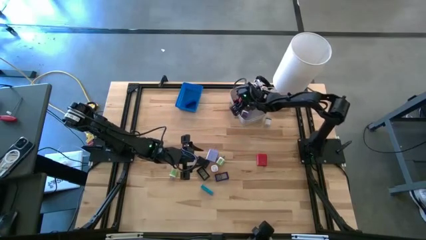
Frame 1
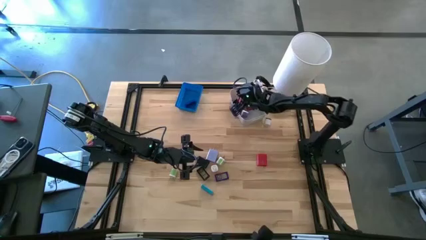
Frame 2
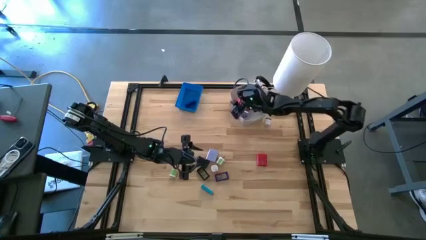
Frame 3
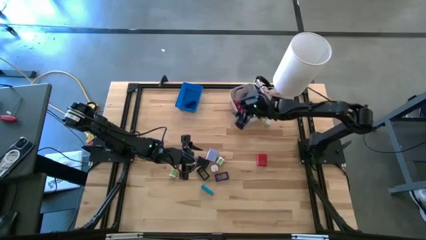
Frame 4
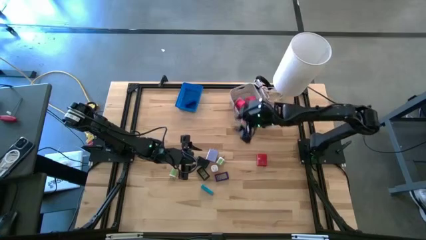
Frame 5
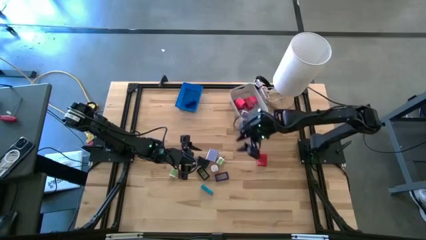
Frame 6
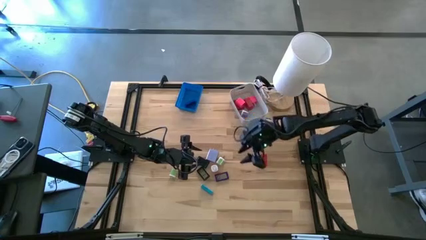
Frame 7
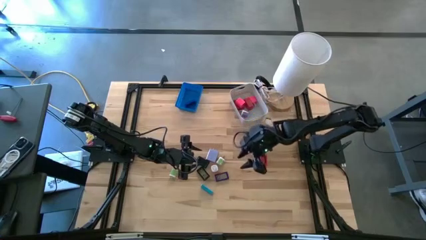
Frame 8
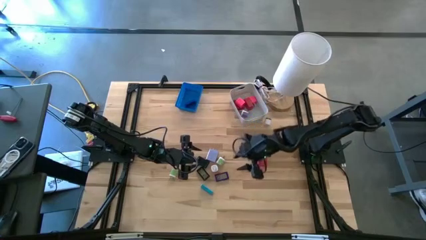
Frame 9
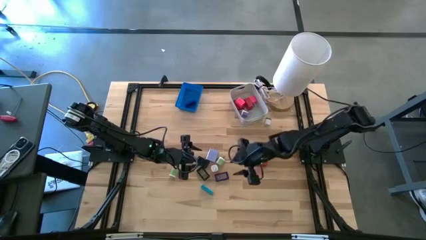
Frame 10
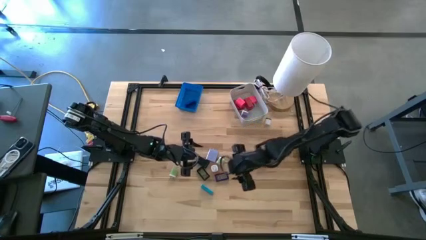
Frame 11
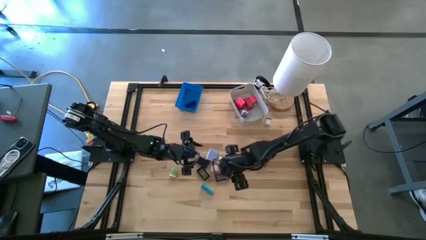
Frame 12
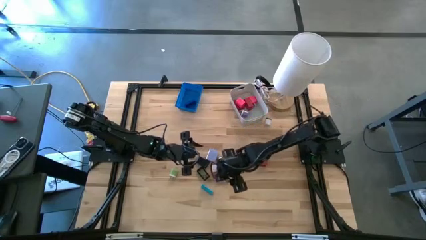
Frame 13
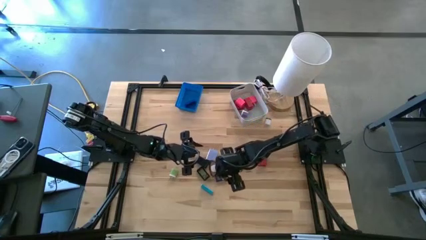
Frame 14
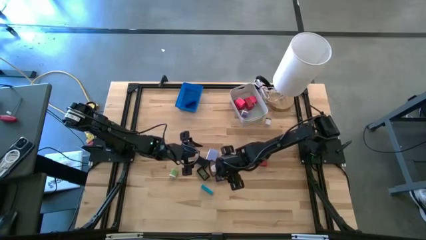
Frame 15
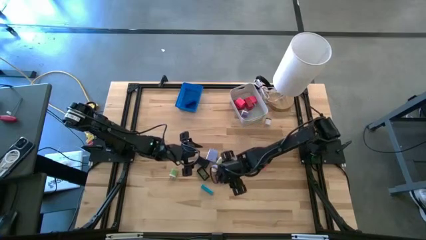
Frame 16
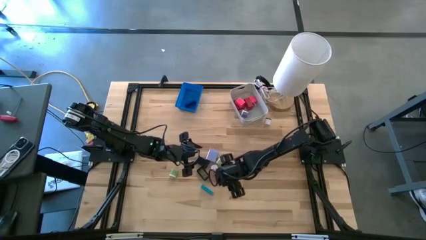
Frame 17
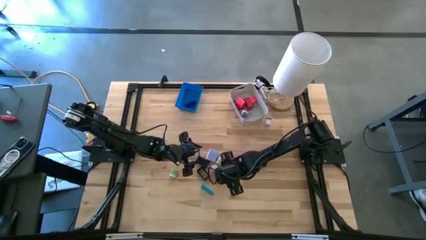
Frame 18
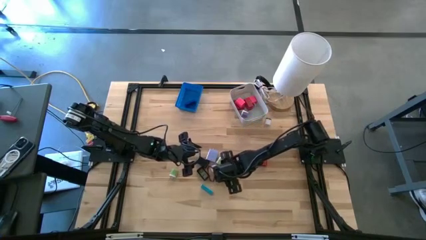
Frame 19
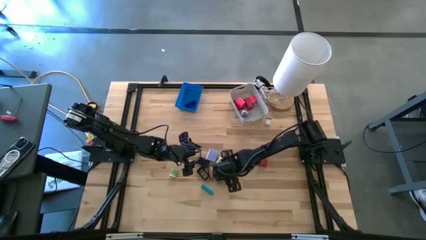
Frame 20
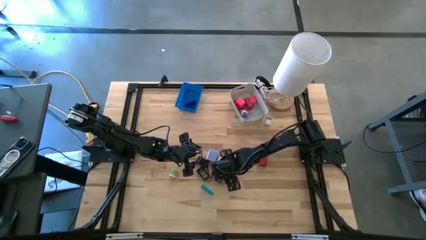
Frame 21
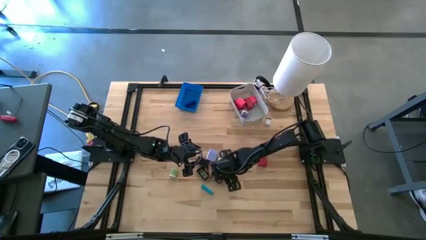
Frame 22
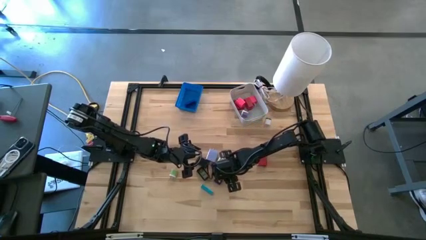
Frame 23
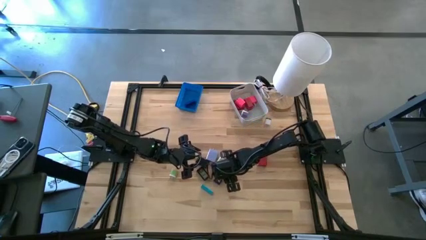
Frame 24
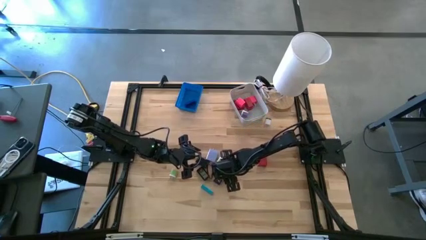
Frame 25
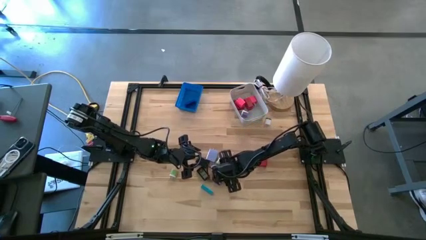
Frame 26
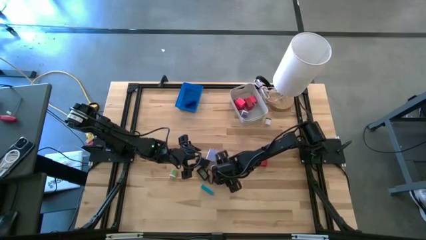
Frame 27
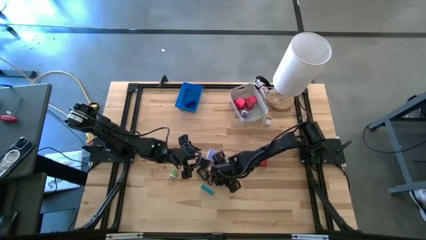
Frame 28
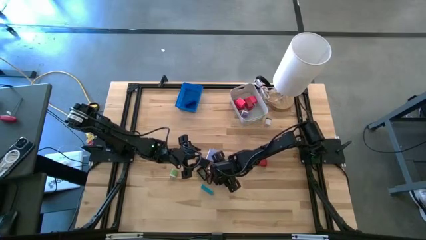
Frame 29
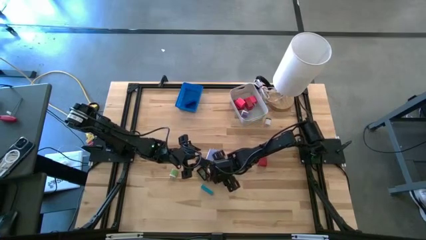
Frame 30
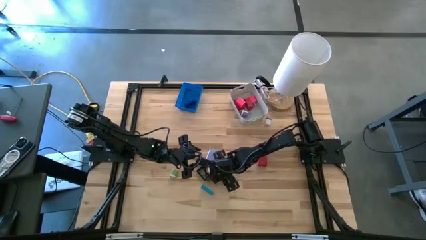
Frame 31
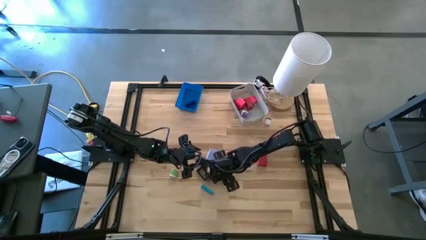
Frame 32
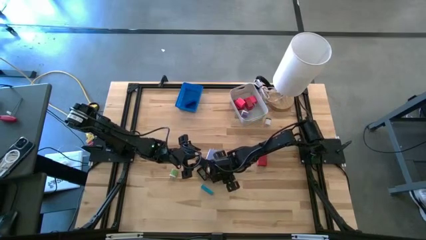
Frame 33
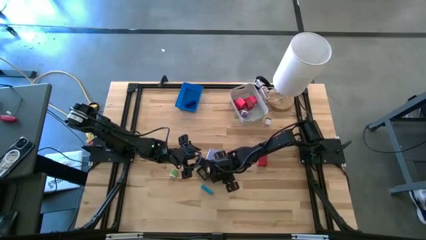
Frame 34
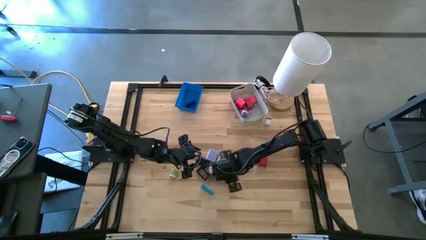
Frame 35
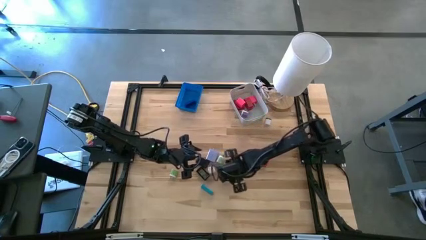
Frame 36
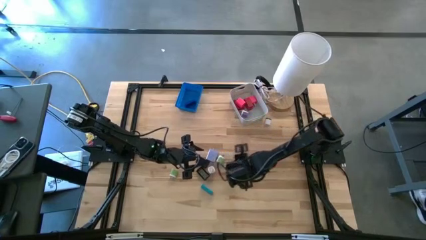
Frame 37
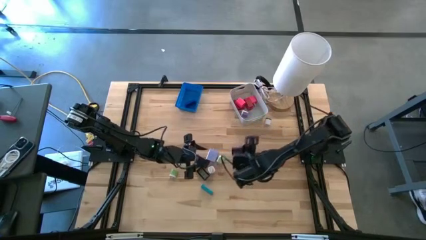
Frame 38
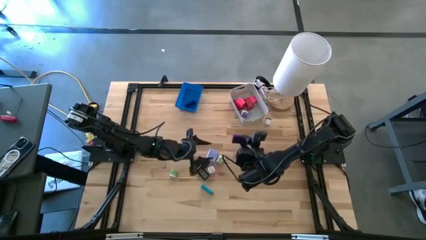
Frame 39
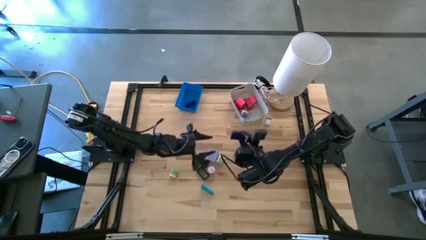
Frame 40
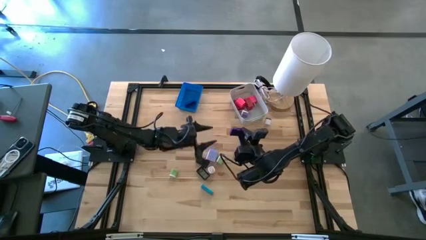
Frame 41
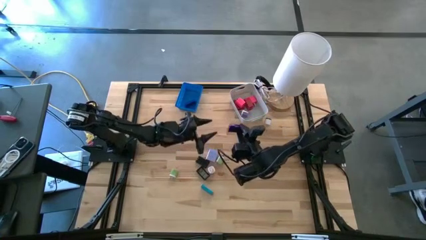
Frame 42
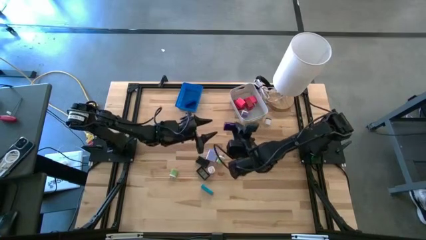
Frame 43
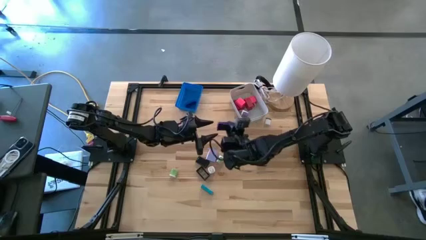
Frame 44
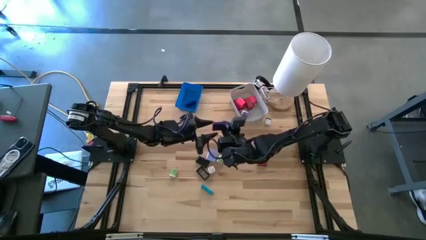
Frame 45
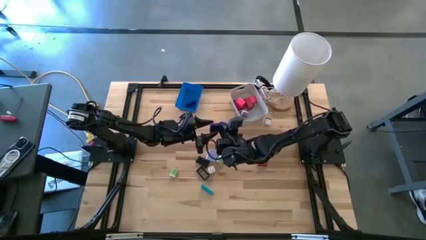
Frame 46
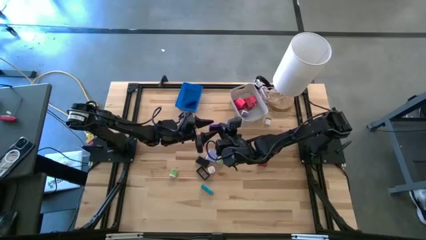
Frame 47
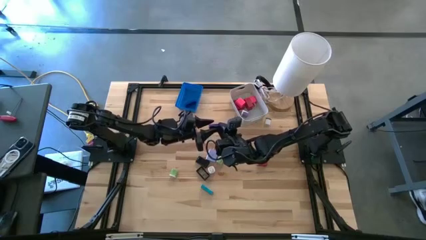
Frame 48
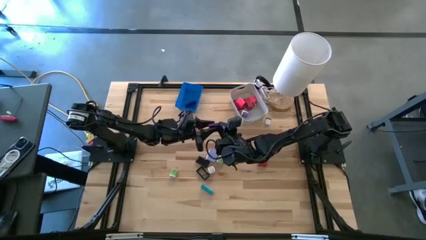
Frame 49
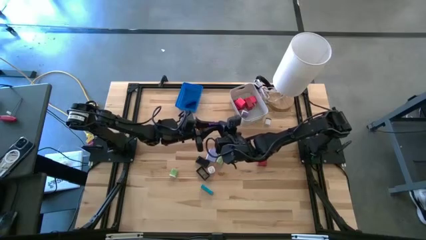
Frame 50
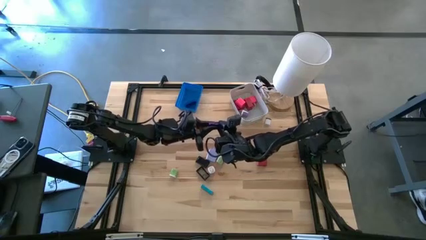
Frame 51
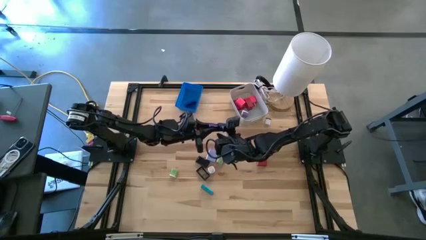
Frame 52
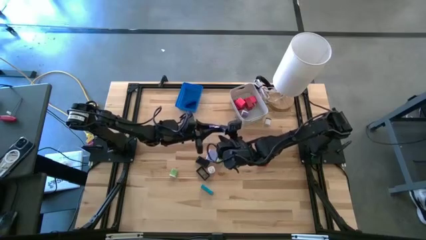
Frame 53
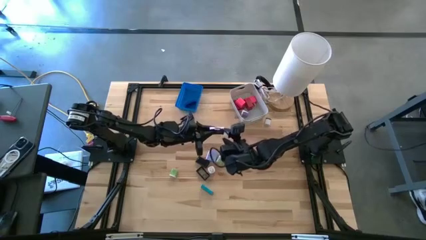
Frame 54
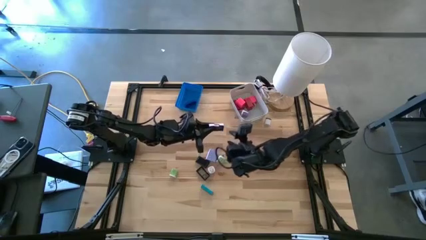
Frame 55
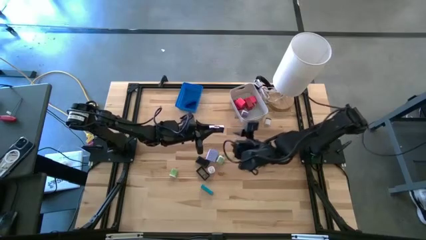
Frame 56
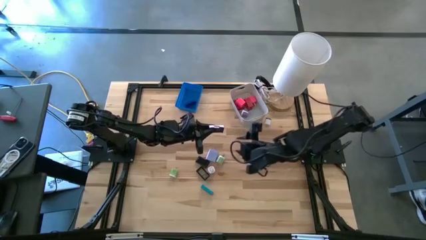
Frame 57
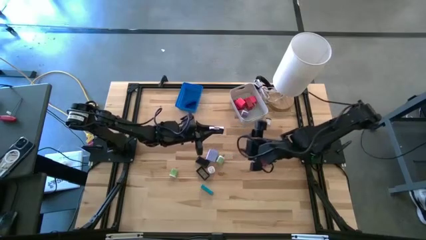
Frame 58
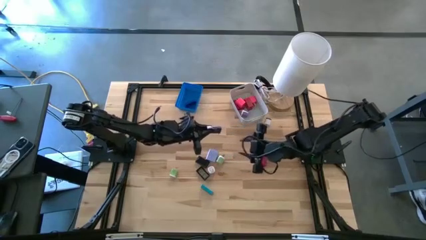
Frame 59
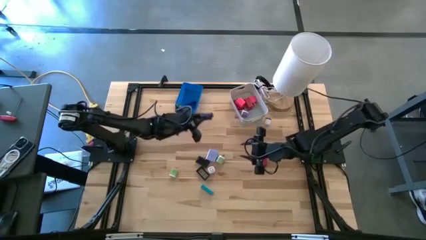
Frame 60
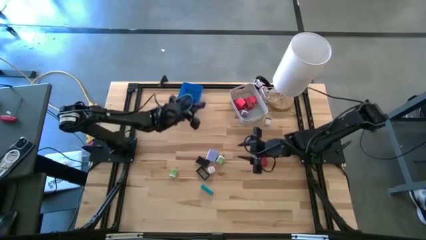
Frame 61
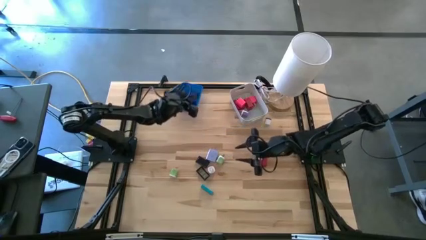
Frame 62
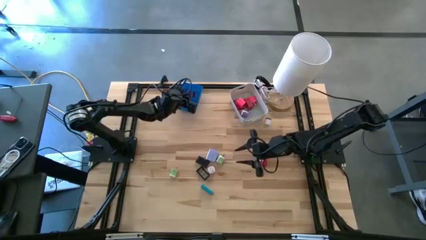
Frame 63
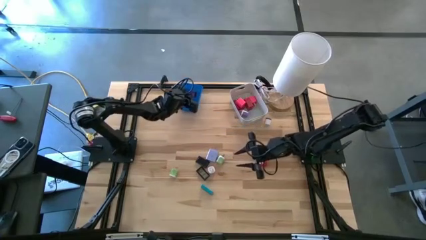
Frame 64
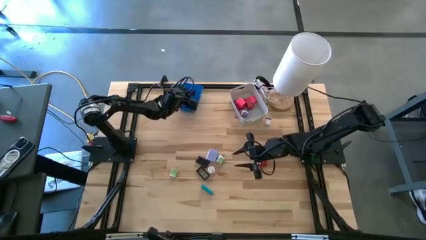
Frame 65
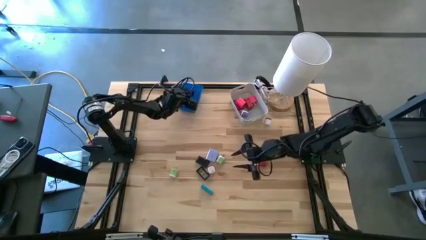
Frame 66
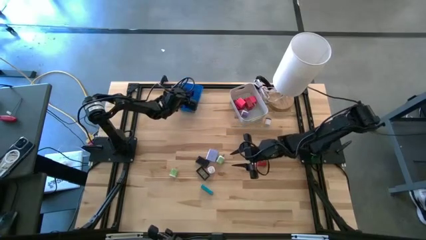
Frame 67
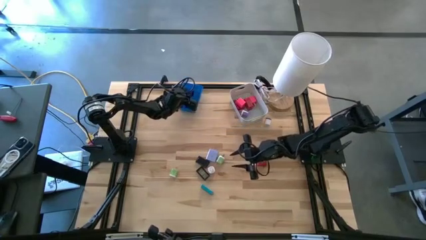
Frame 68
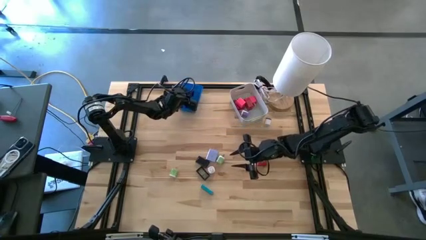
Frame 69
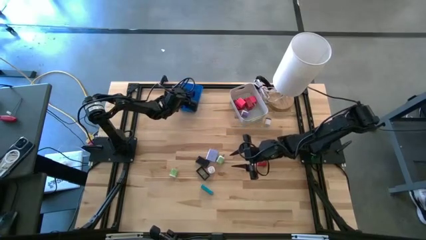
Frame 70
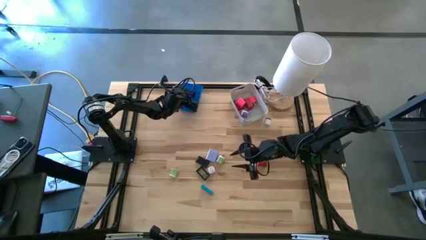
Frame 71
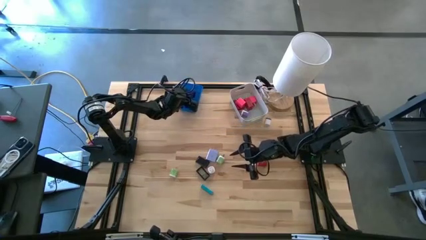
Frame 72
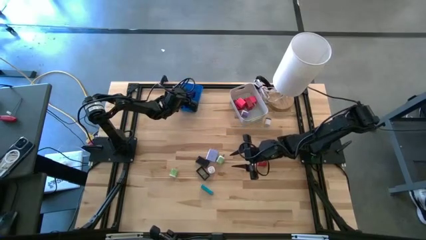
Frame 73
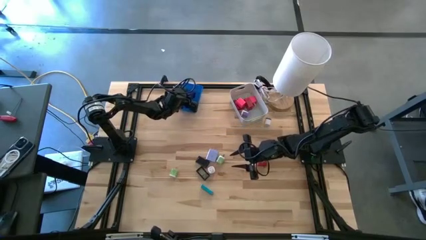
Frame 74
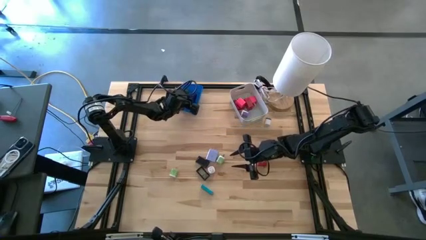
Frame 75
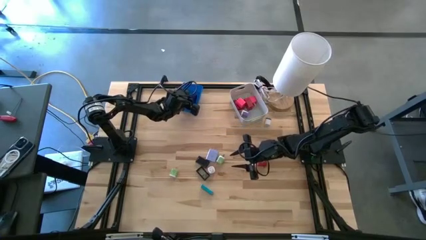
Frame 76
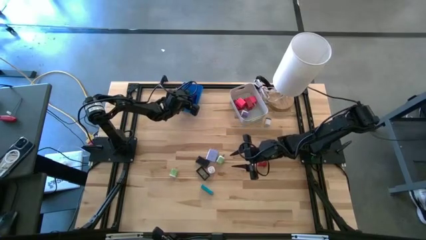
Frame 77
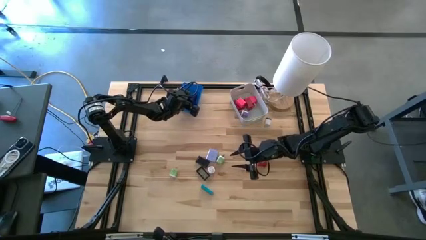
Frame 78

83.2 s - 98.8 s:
Task: Pick & Place Office items
Put the dark blue digital timer into the blue bin
